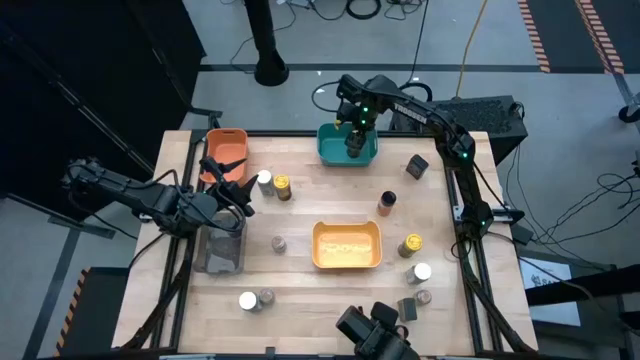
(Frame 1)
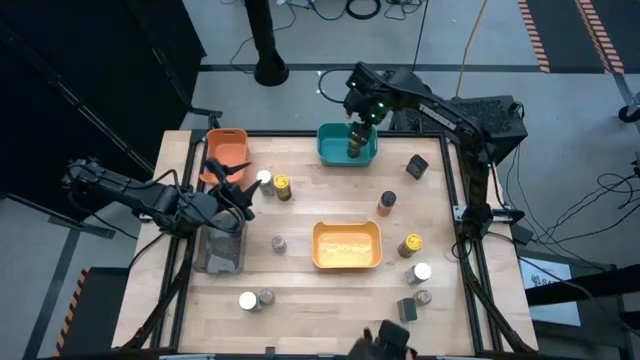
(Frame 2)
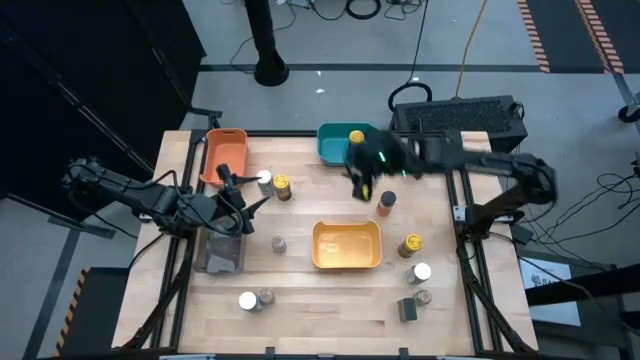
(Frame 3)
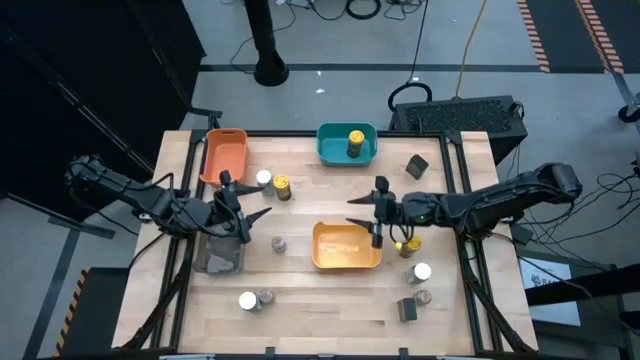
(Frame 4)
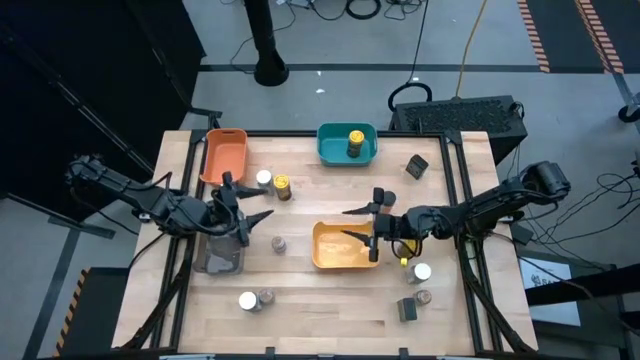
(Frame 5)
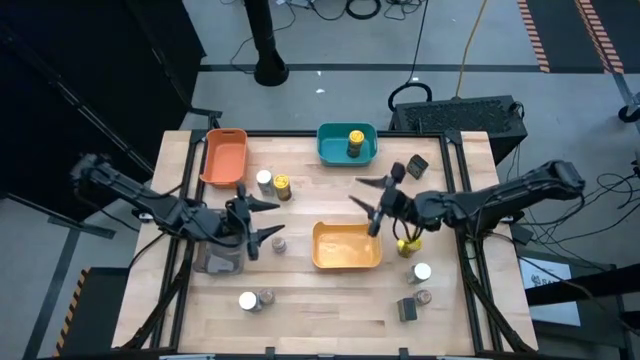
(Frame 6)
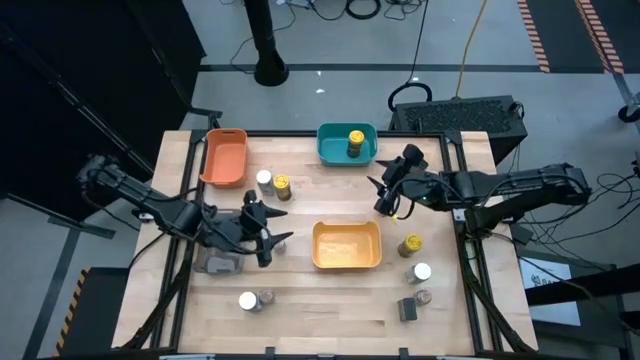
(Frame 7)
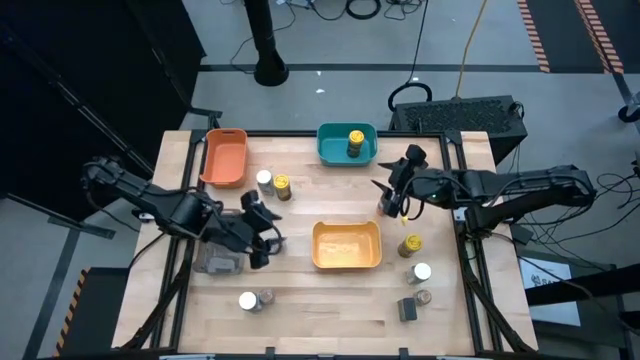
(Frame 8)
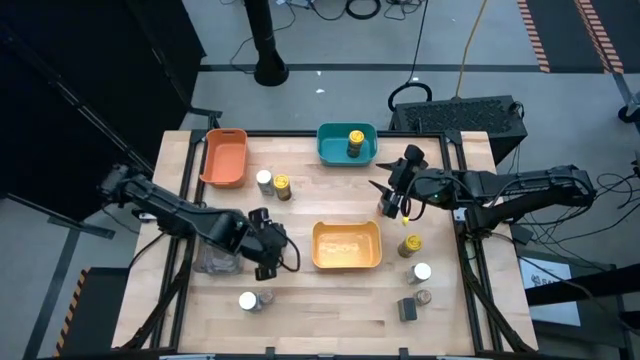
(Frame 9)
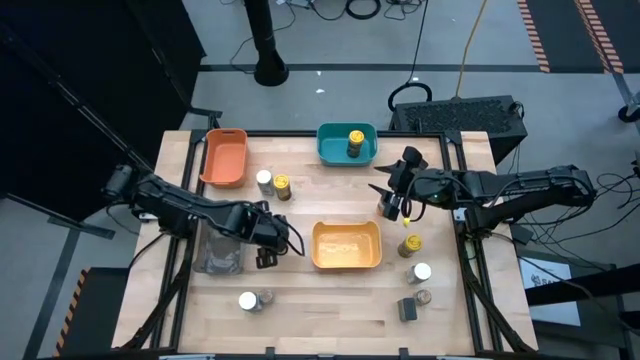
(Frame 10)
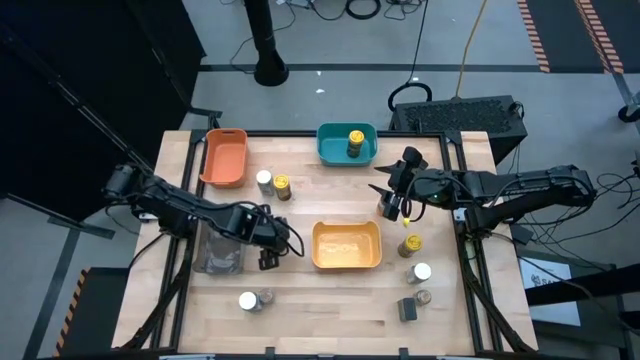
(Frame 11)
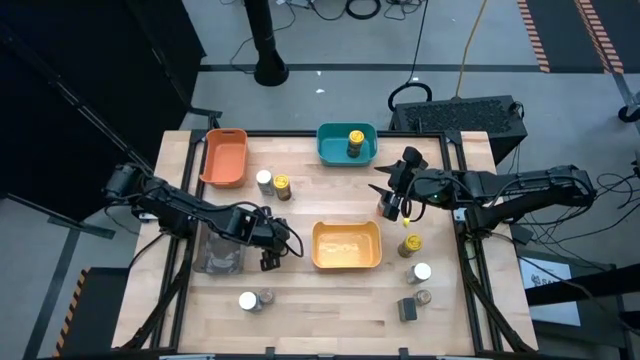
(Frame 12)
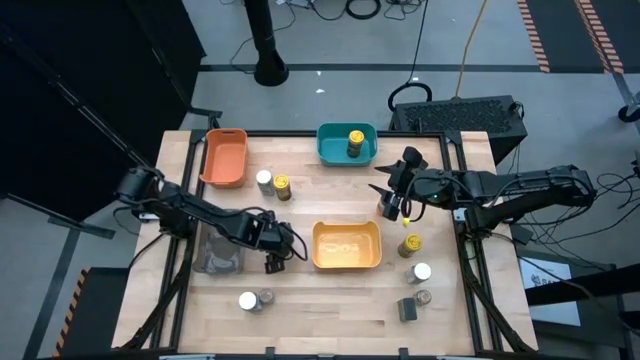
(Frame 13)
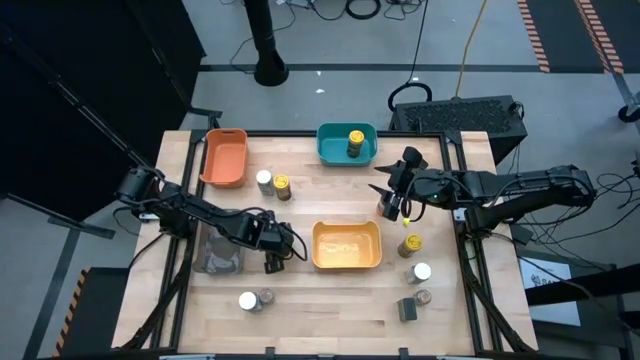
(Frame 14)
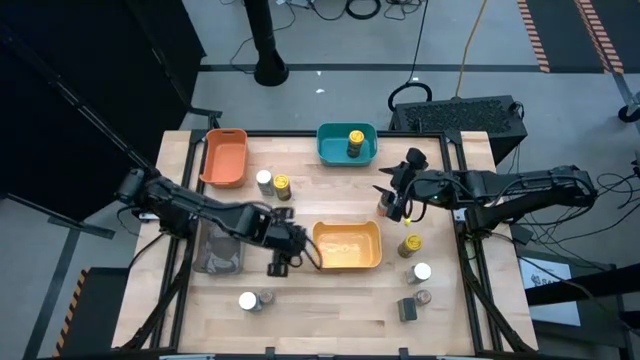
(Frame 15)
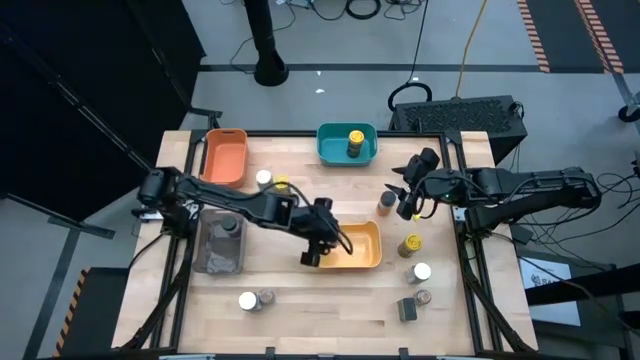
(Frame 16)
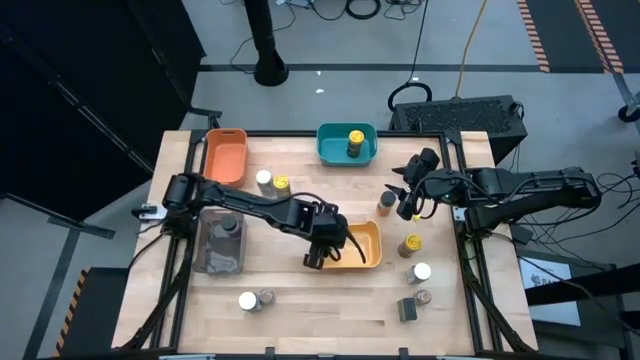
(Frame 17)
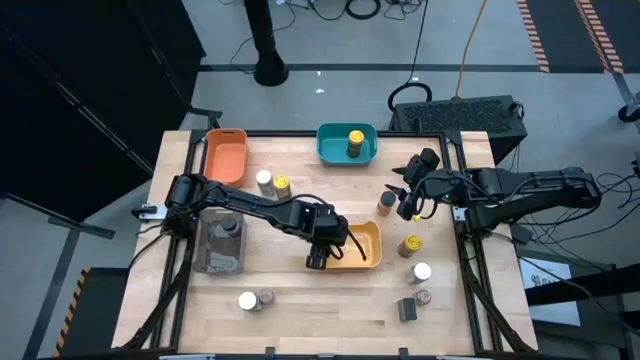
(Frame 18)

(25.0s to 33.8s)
Task: Sort spices by type
Put the top left brown spice bottle into the yellow bin

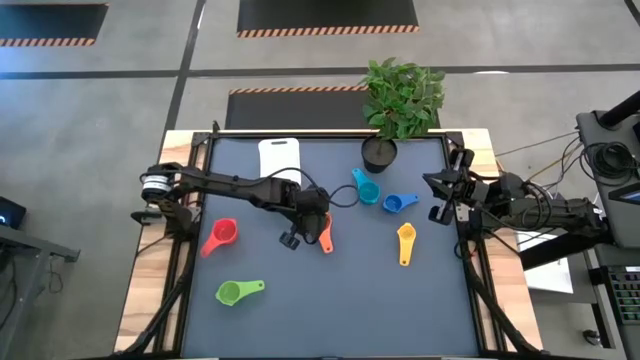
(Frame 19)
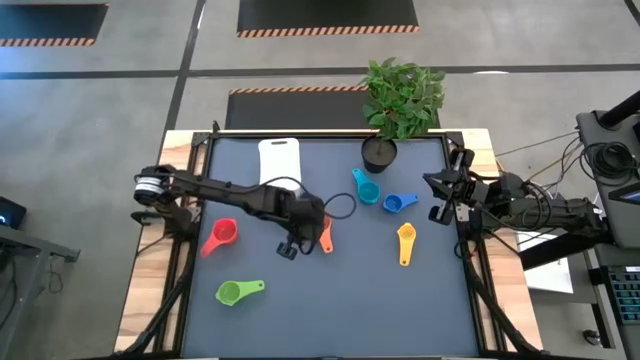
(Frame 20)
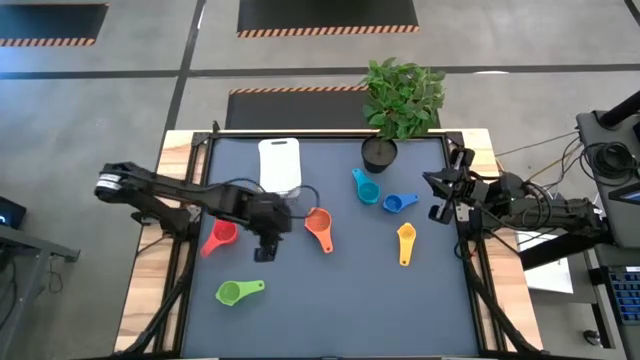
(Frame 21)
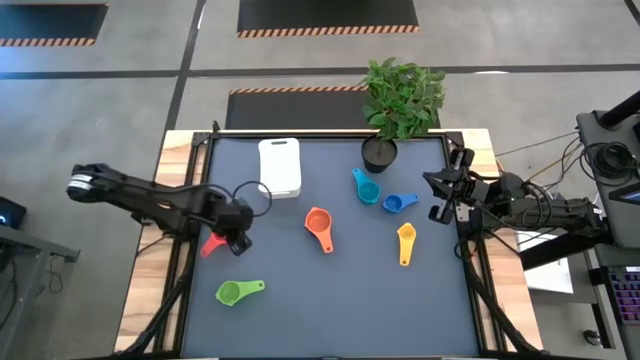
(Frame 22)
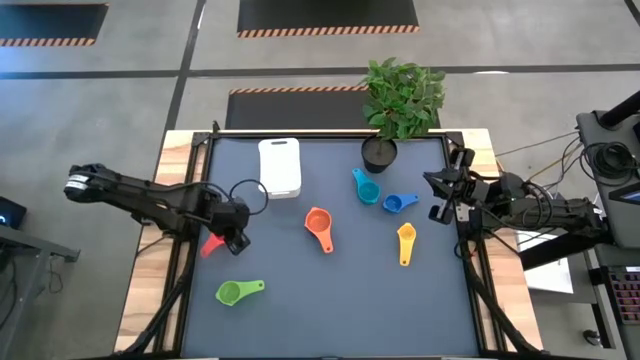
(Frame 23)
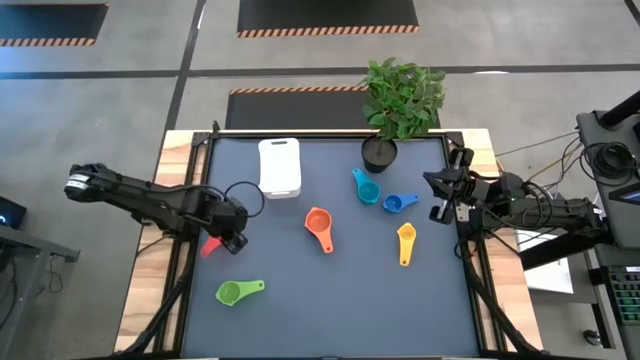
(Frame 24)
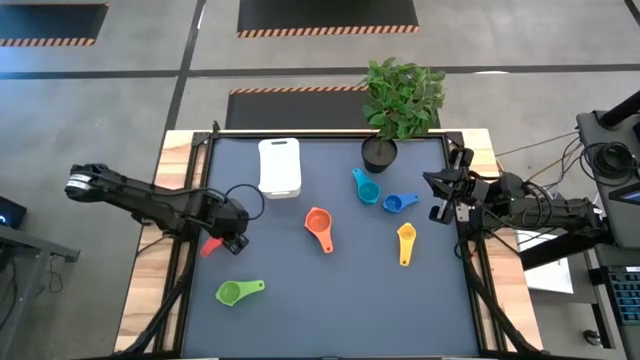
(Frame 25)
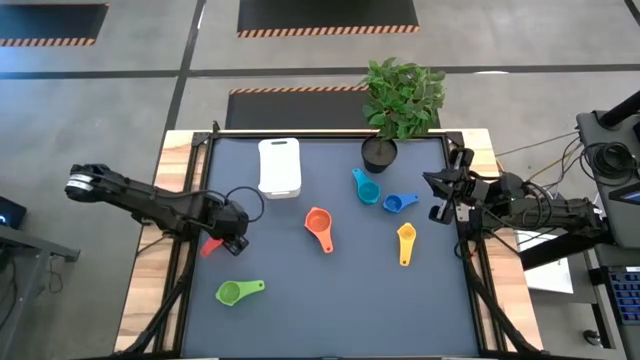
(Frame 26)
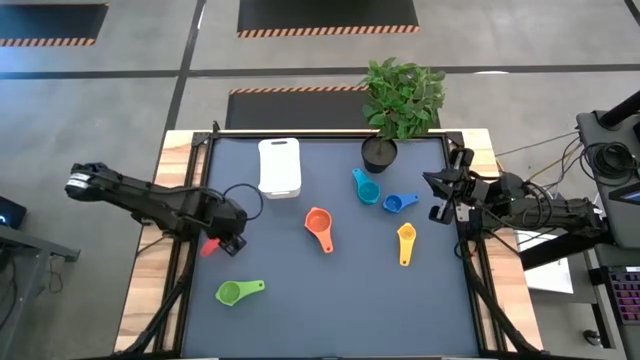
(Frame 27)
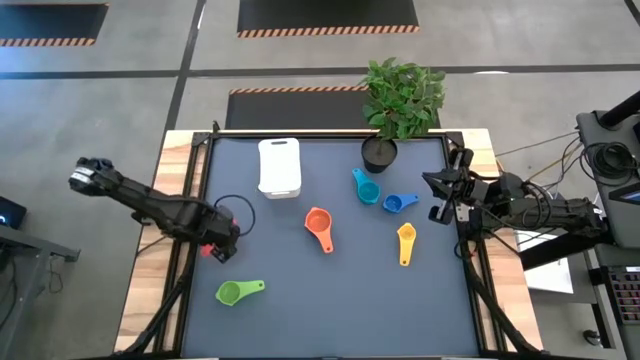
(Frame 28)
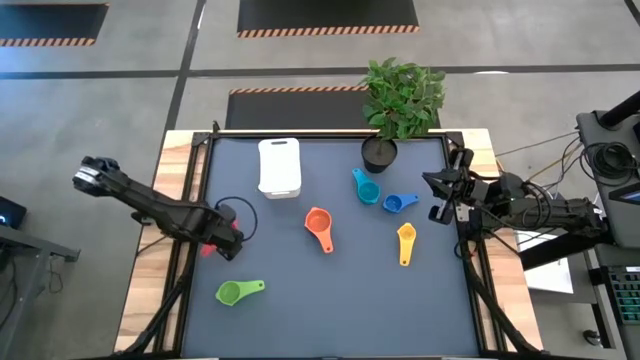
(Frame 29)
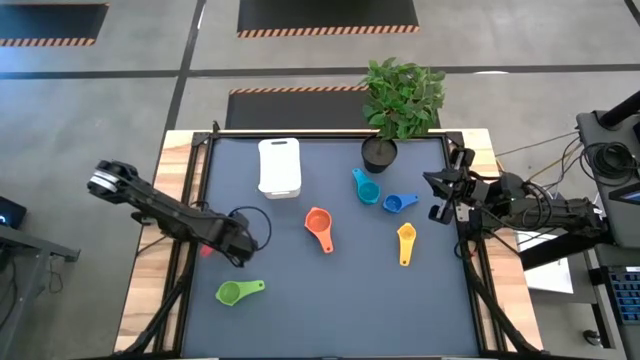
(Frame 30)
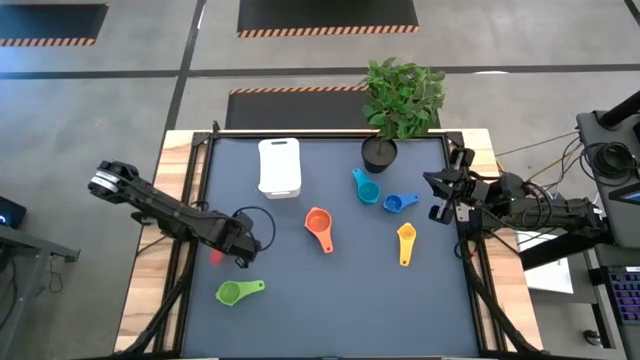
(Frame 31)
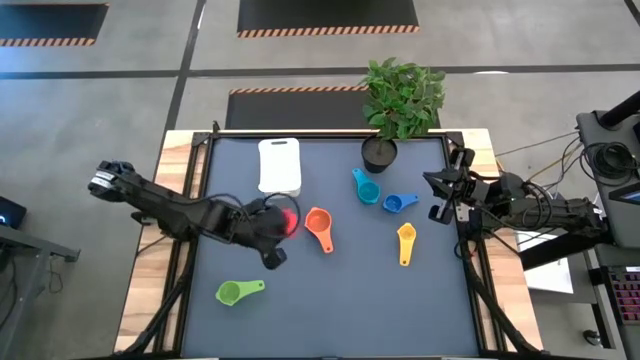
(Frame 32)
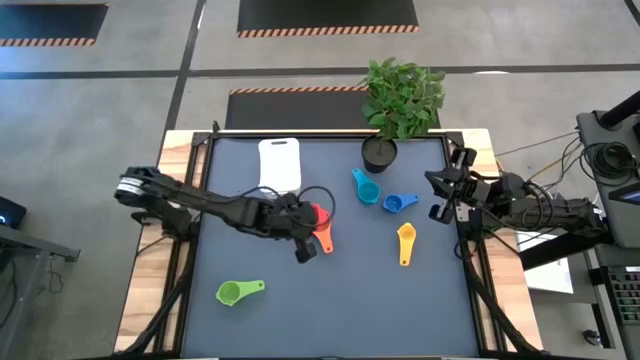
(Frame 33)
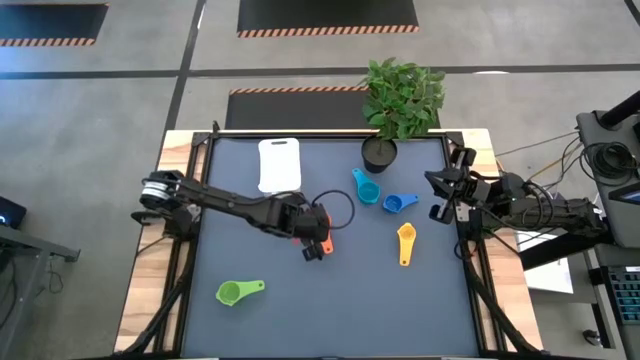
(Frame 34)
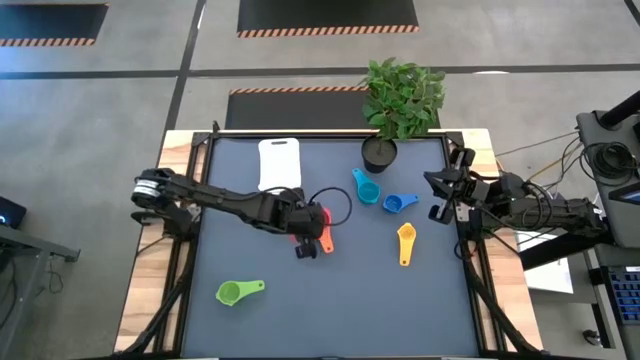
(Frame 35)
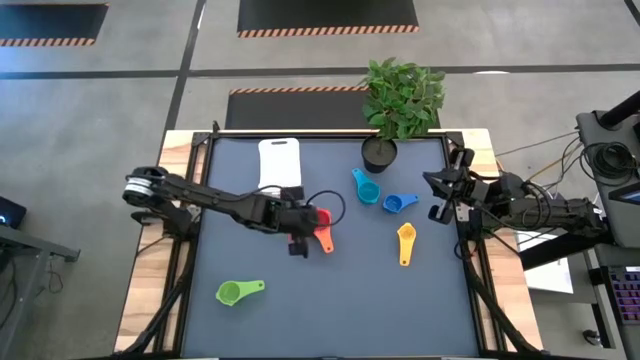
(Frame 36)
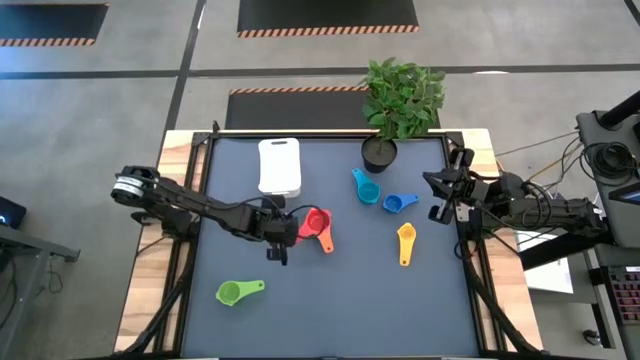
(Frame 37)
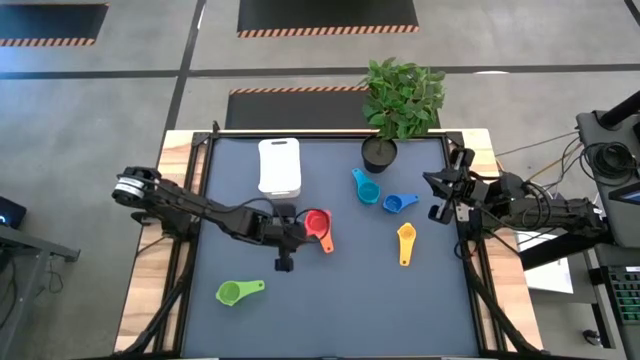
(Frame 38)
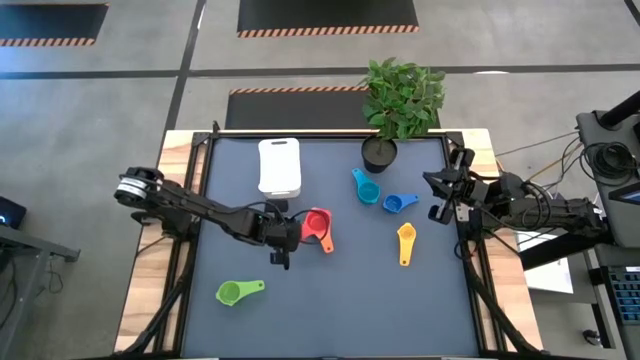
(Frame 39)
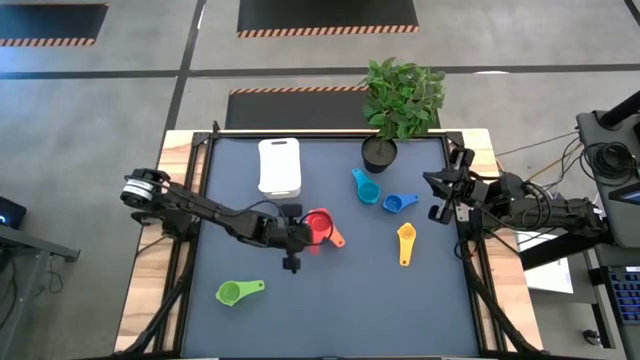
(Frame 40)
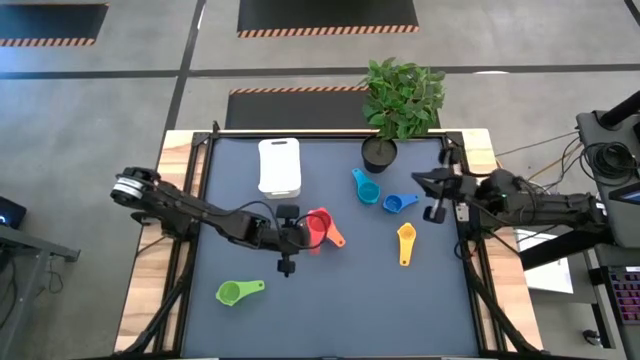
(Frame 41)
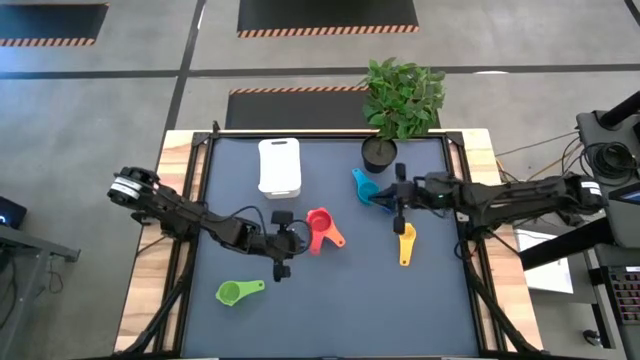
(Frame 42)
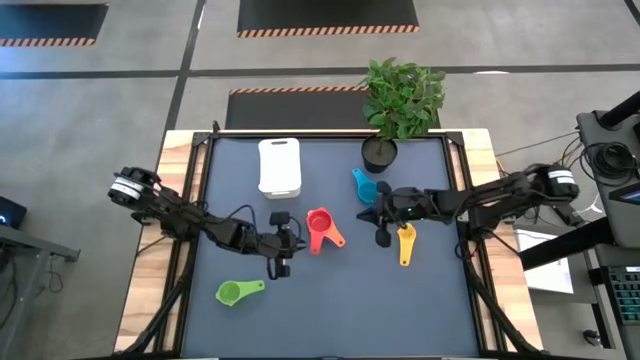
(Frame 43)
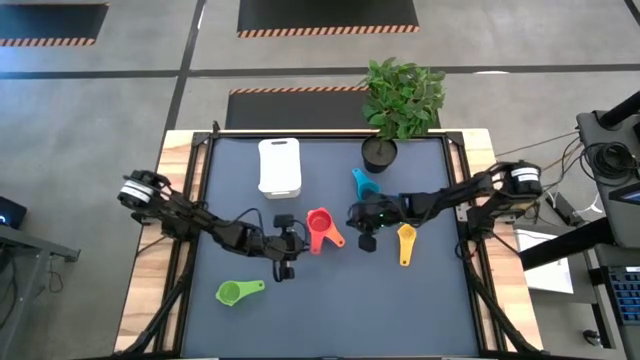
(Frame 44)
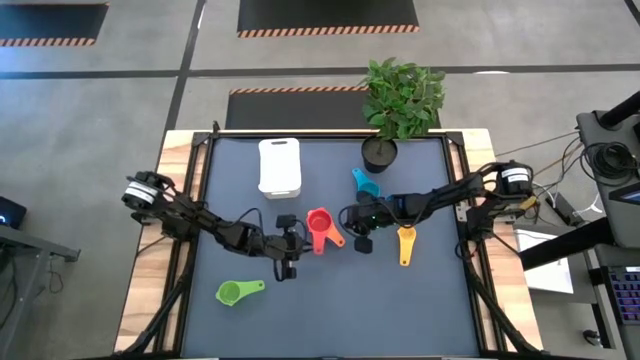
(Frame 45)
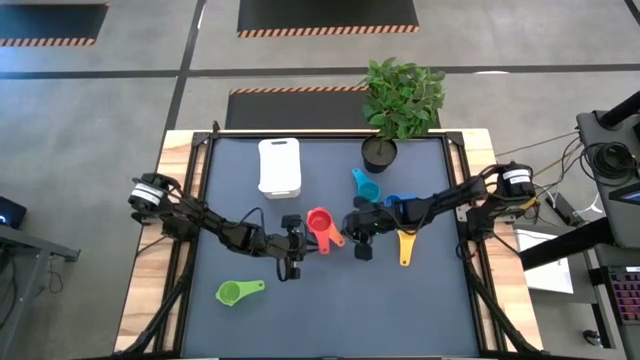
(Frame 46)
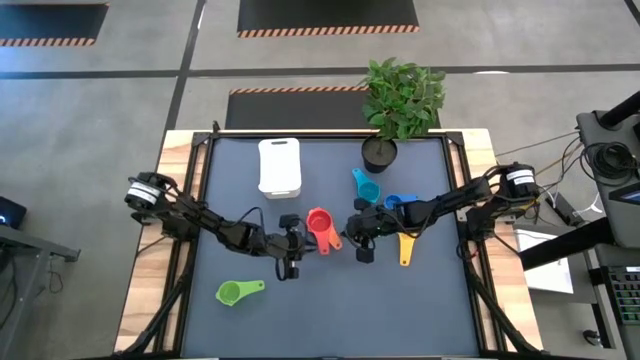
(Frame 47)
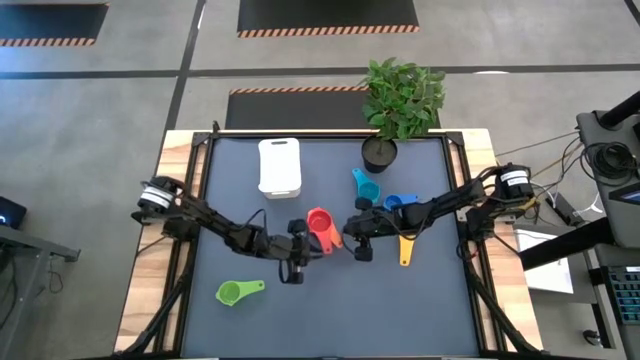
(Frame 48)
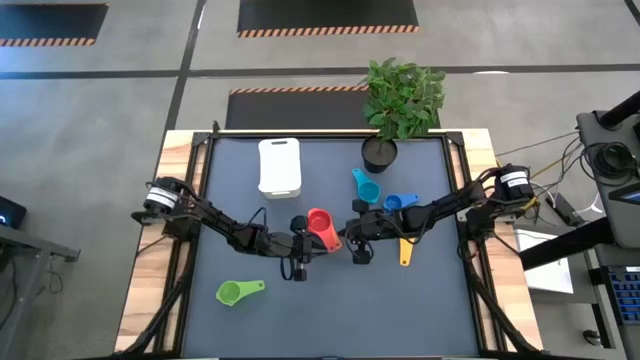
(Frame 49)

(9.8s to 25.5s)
Task: Nest measuring cups in basket
Stack the light red measuring cup on top of the light orange measuring cup
